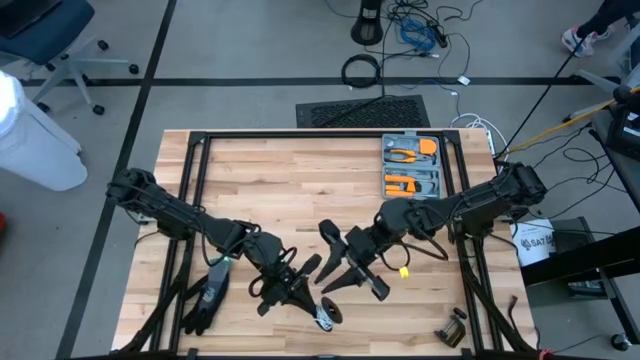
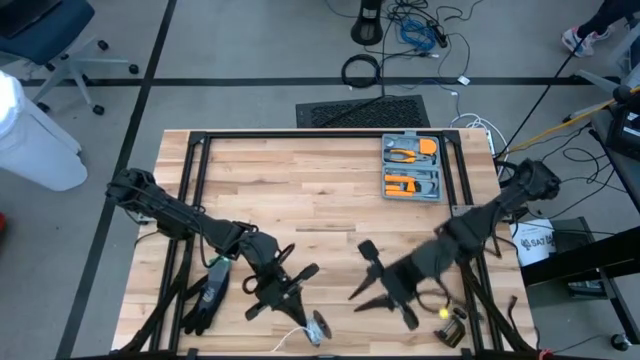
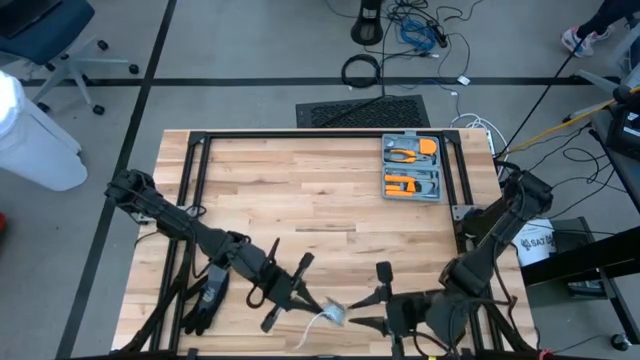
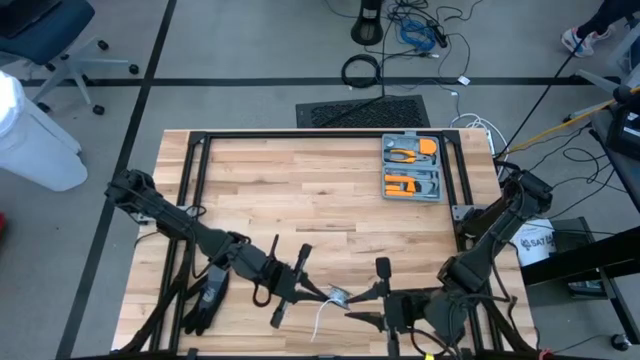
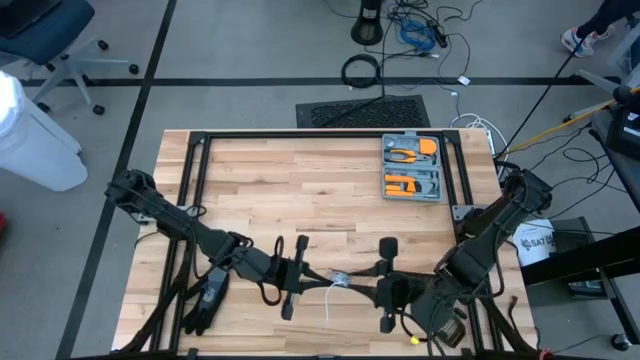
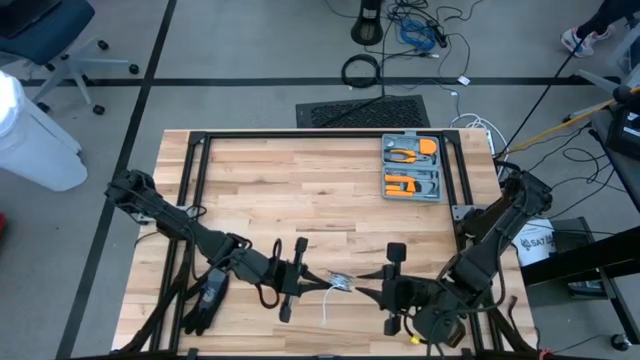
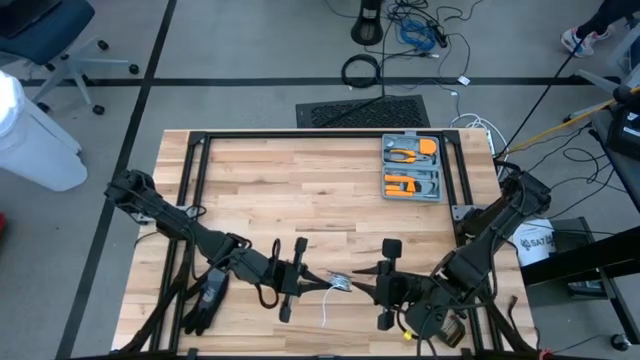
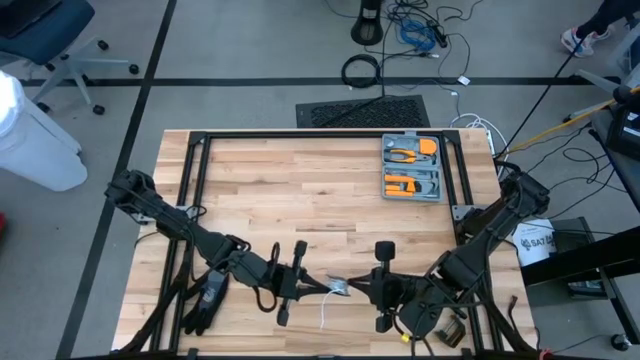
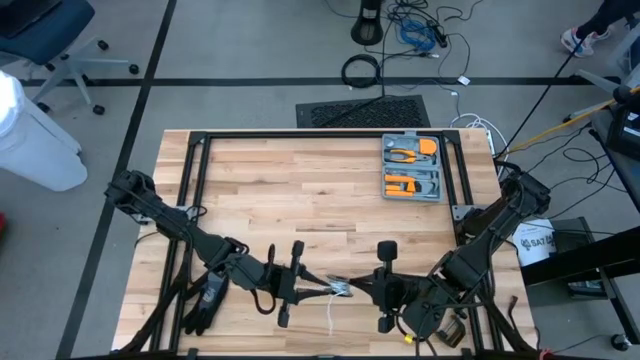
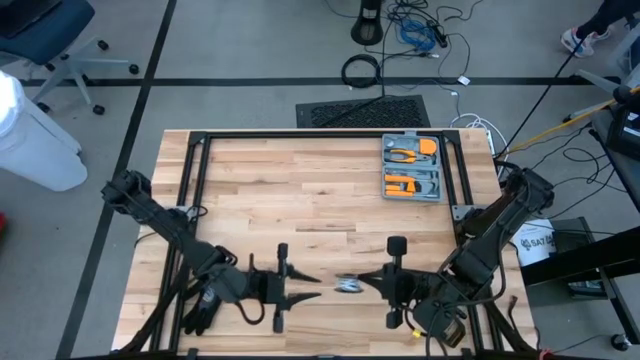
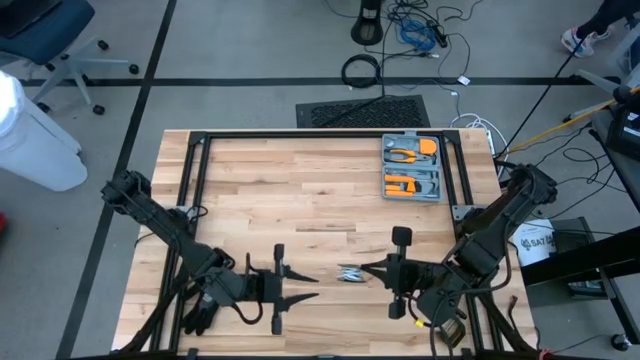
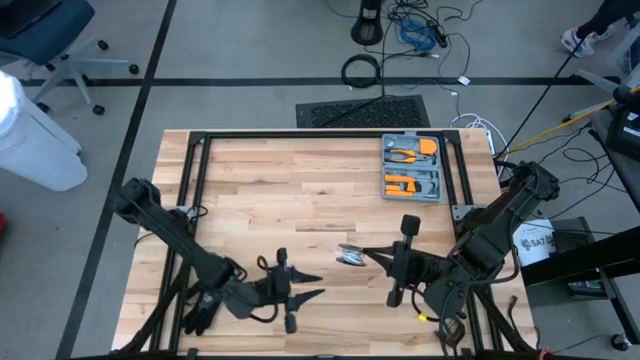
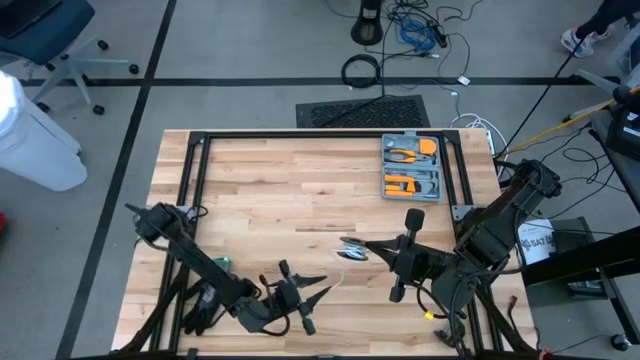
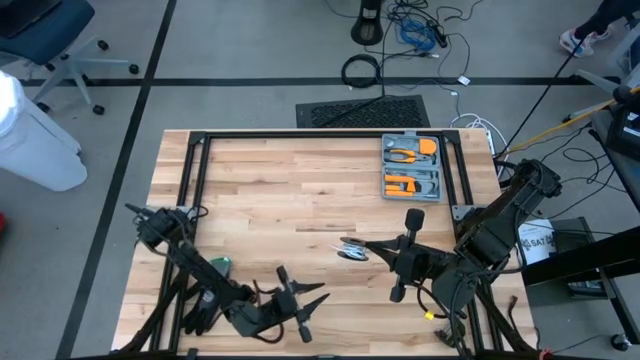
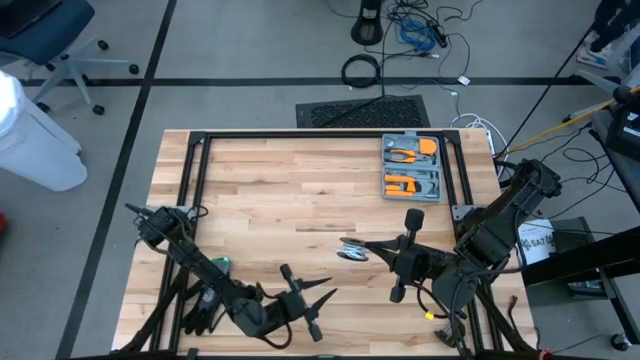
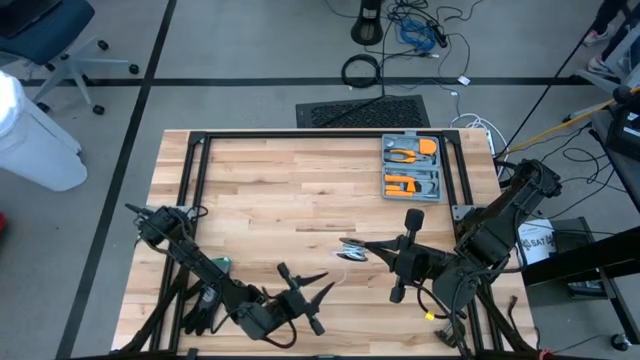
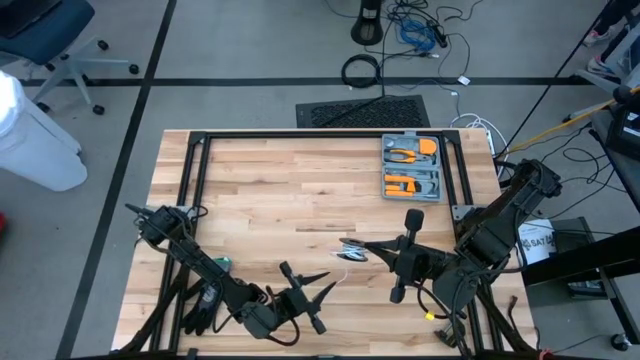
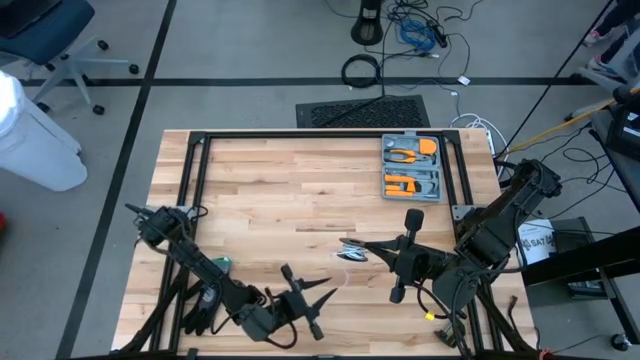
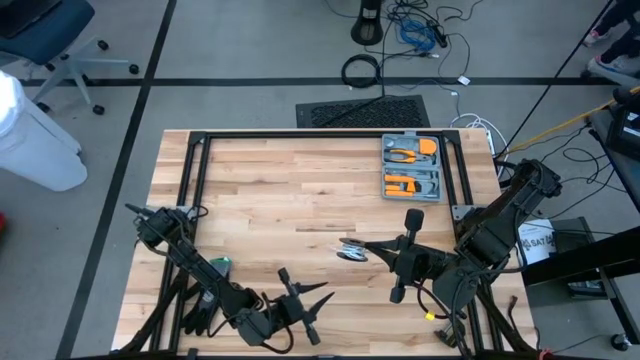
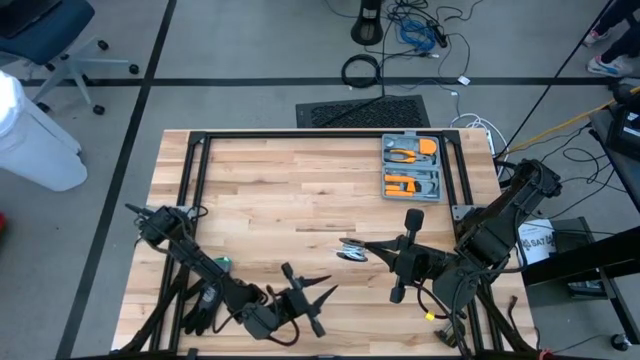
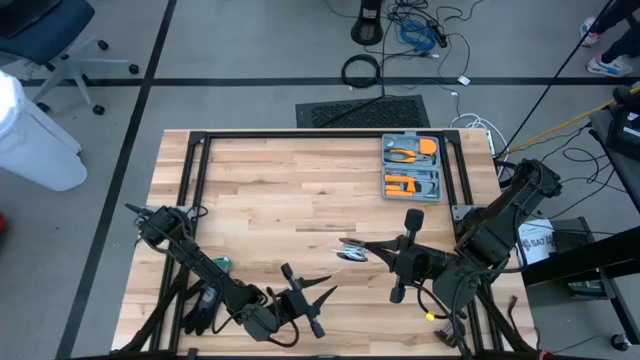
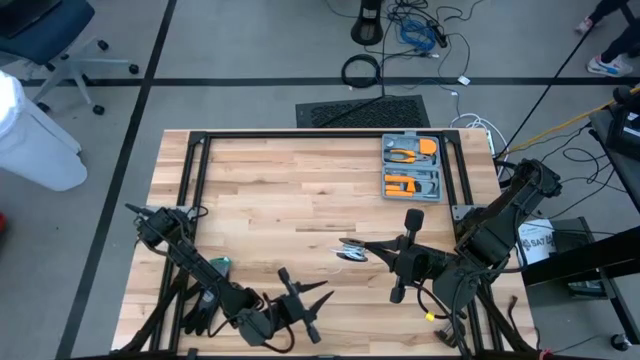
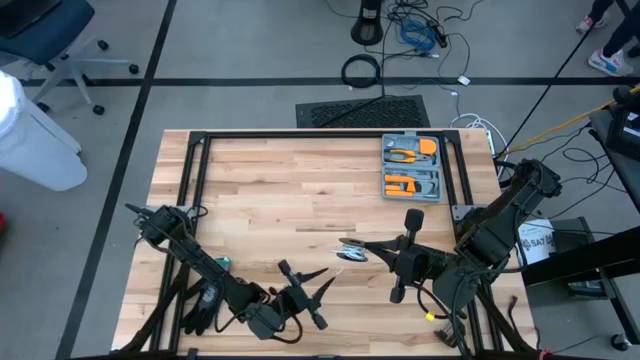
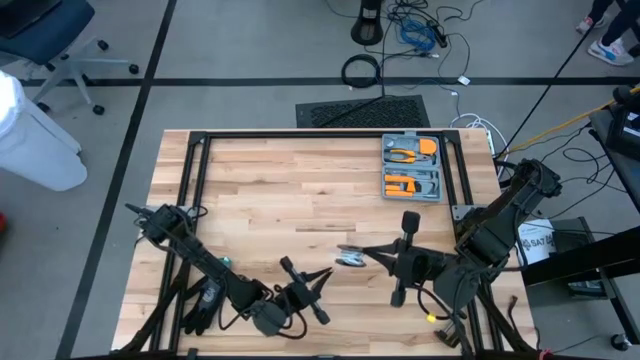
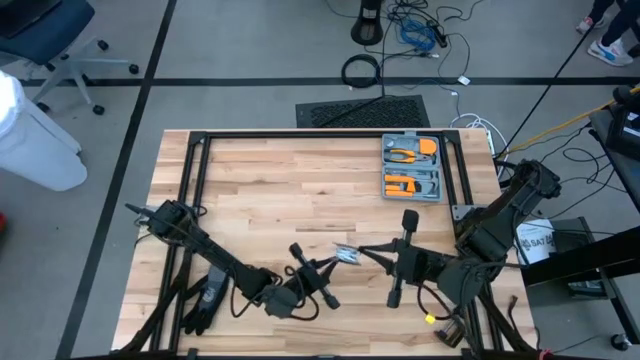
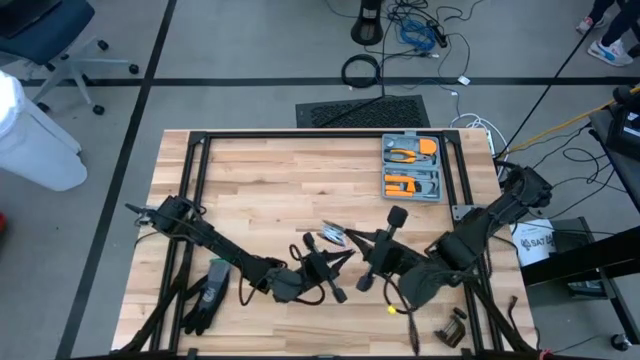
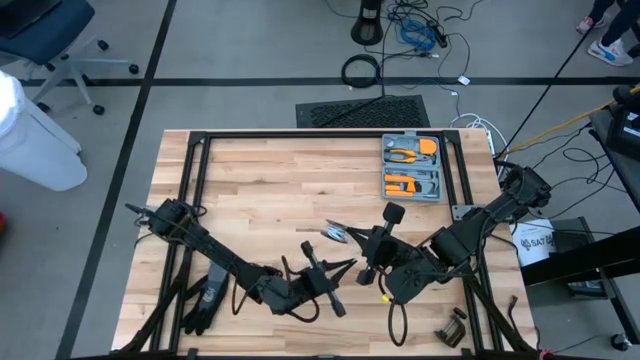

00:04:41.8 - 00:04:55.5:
Task: Coil cords
Coil the white wire onto the spool

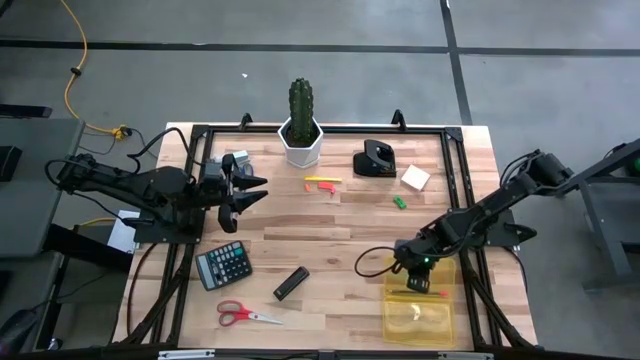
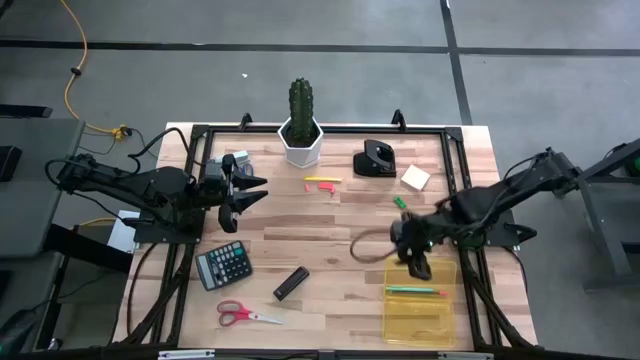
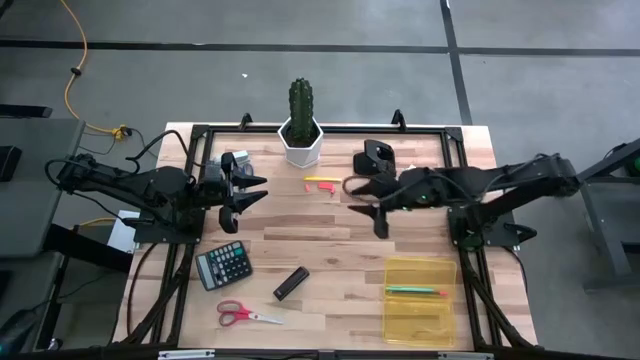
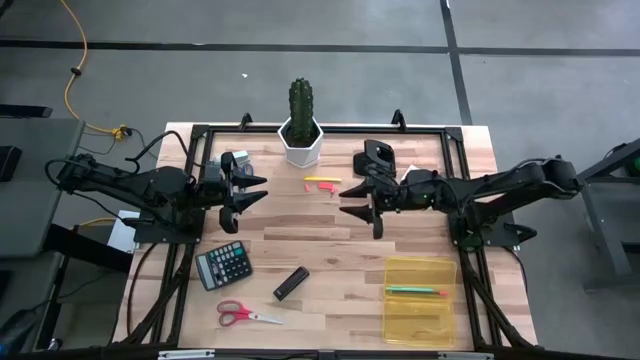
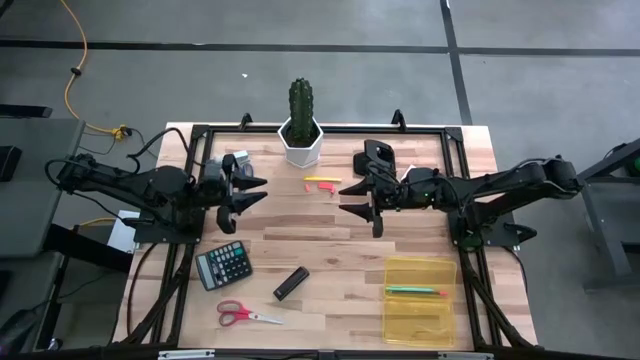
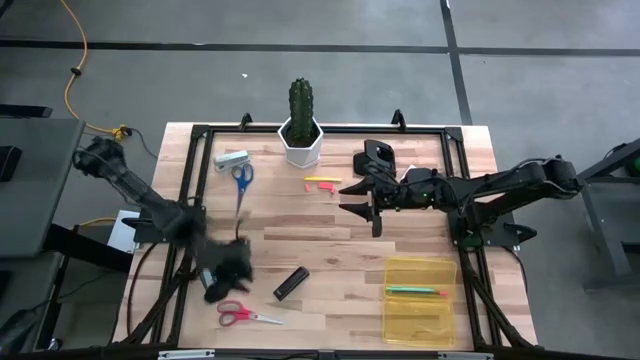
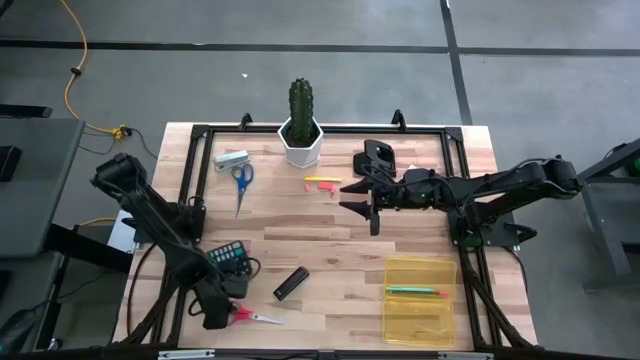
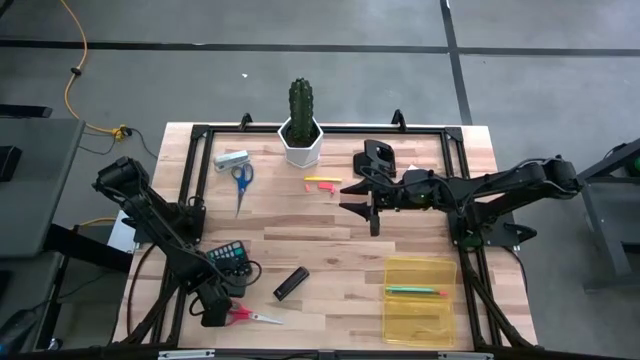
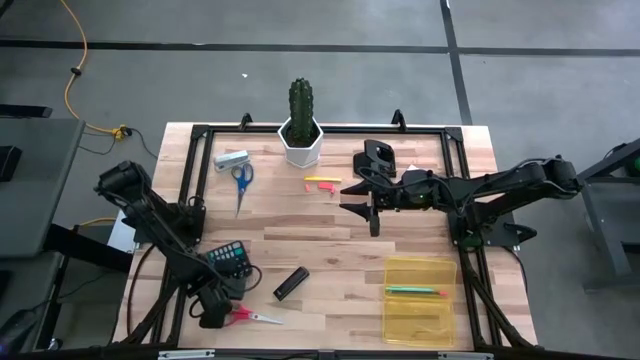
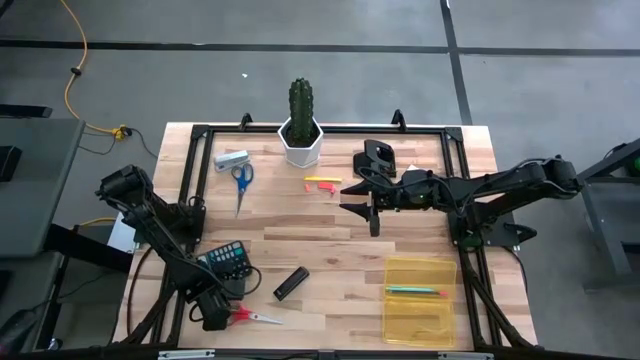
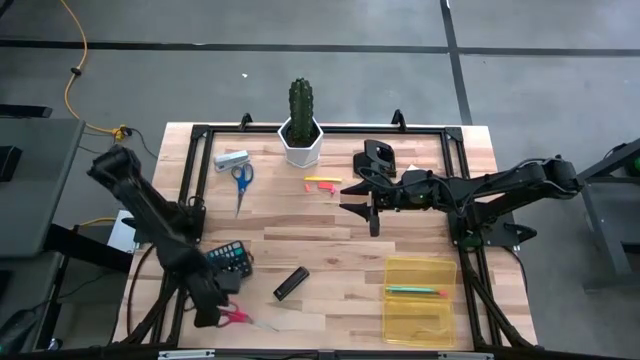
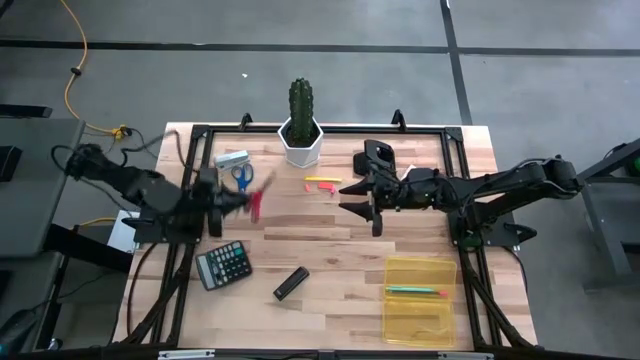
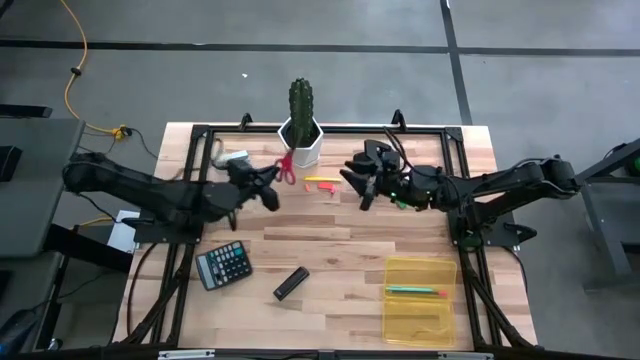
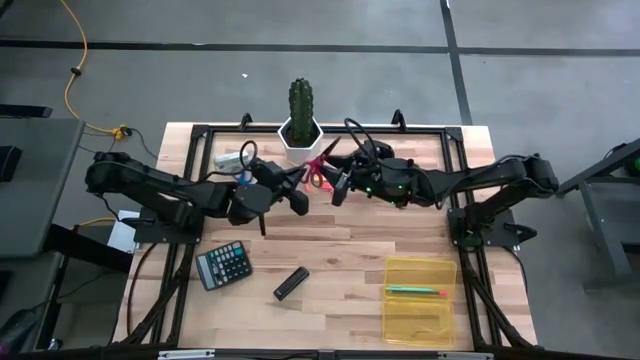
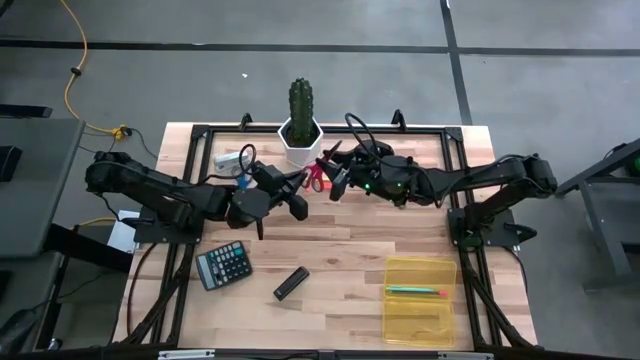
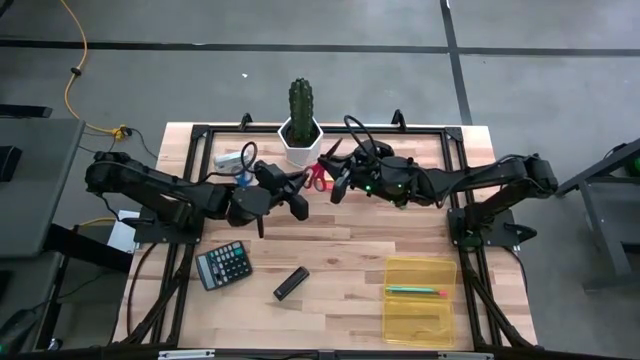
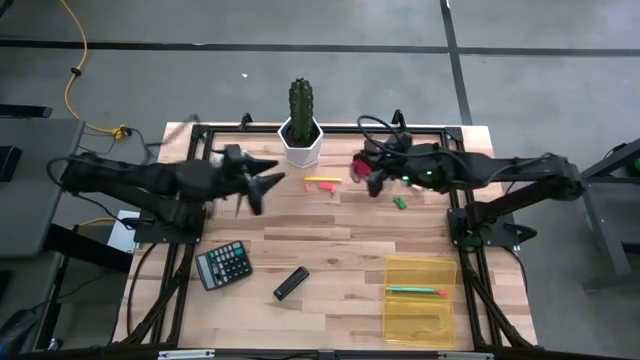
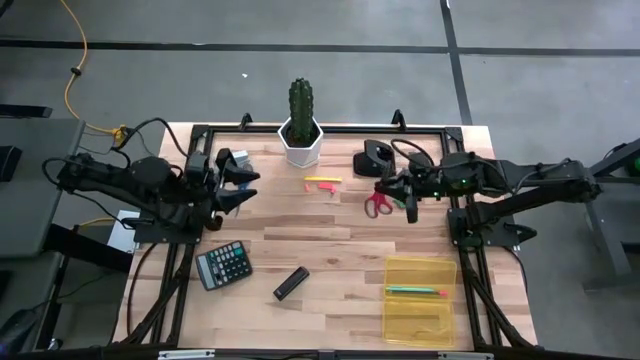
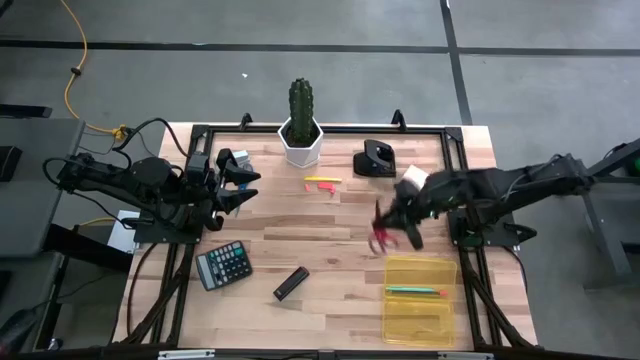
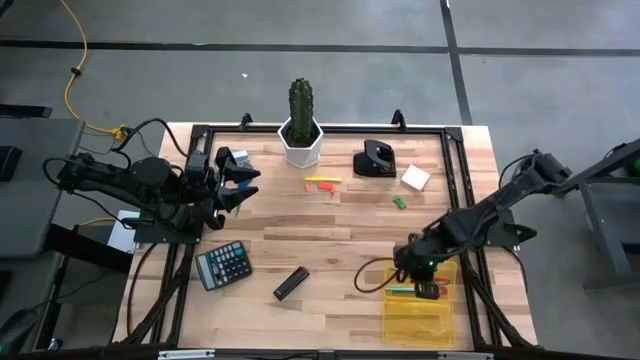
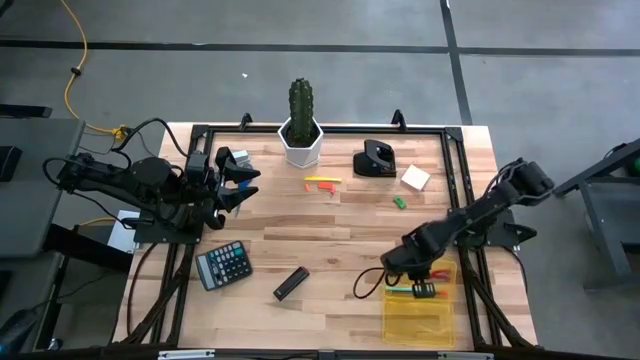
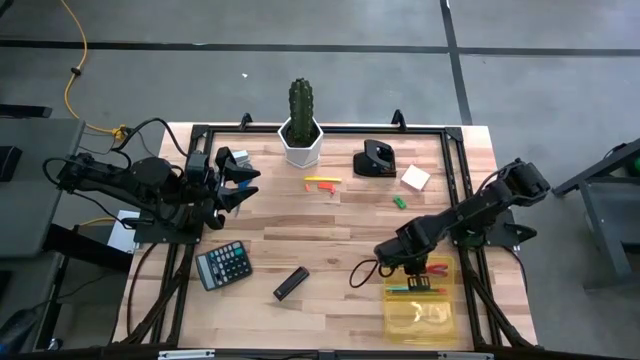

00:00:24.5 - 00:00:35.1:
Task: Pack school essentials
Put the red scissors on the yellow supply box
